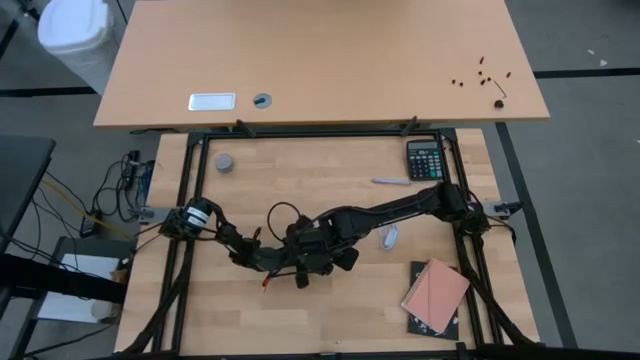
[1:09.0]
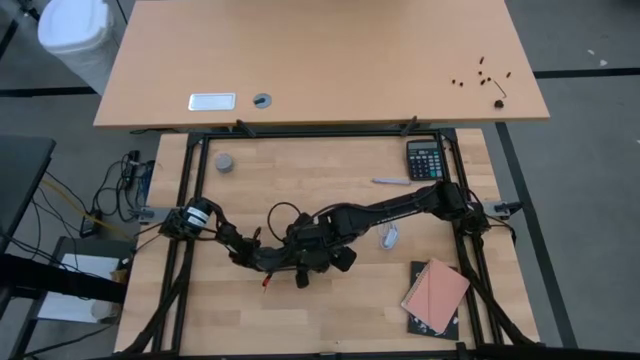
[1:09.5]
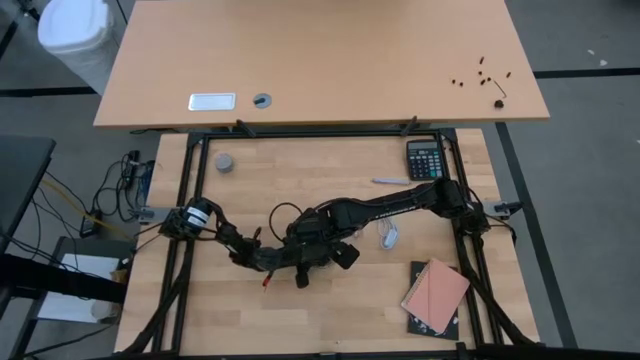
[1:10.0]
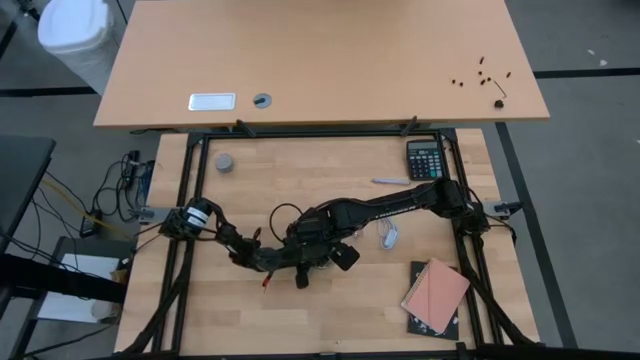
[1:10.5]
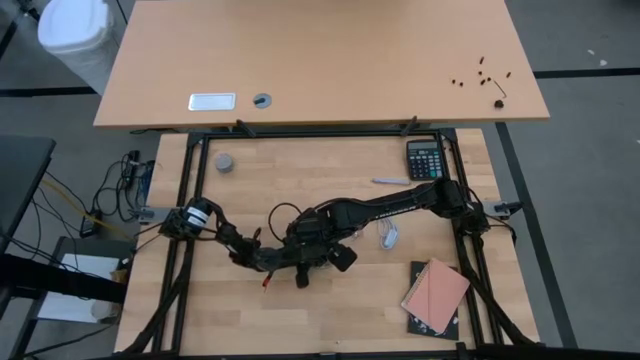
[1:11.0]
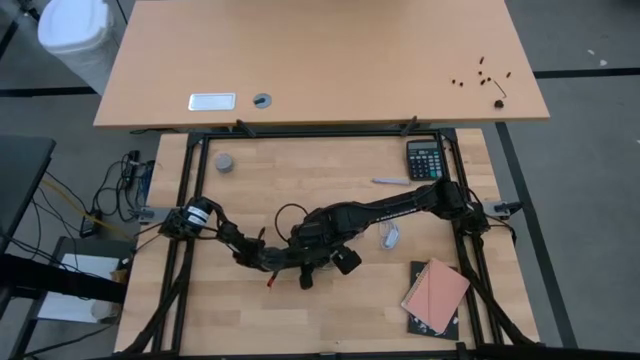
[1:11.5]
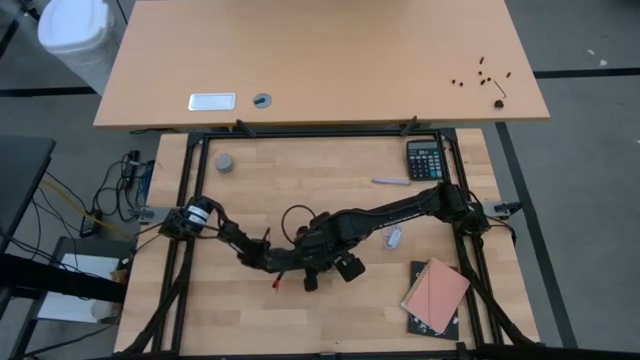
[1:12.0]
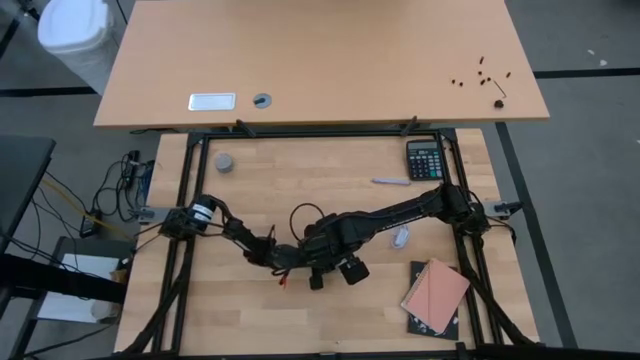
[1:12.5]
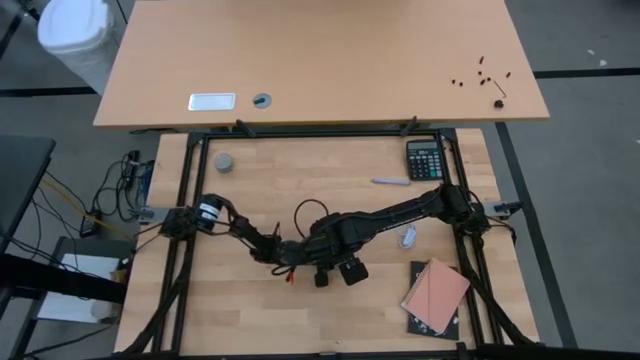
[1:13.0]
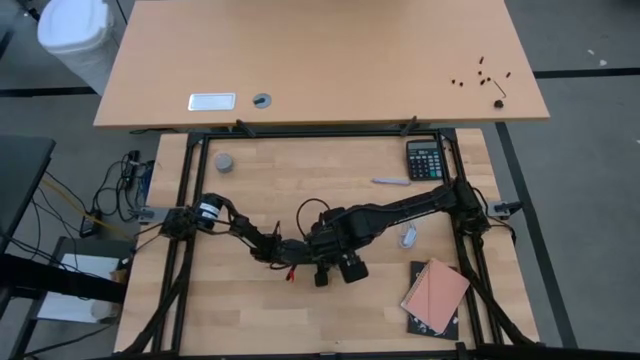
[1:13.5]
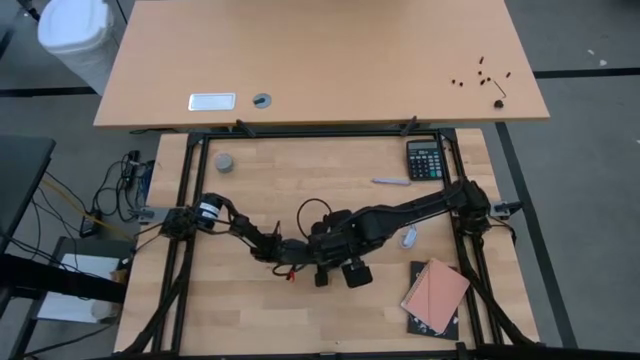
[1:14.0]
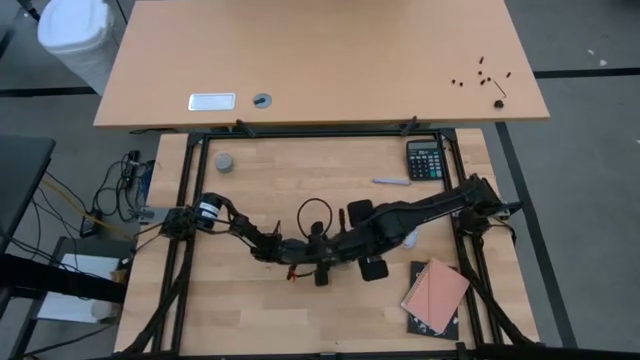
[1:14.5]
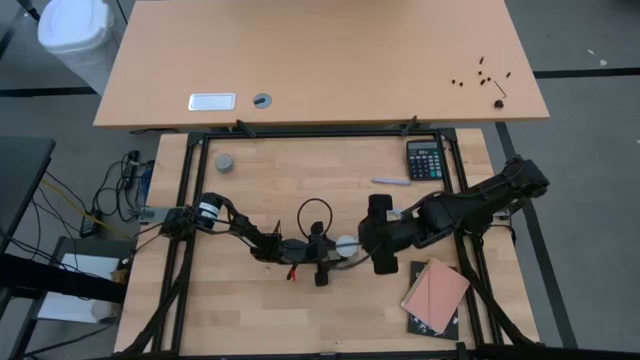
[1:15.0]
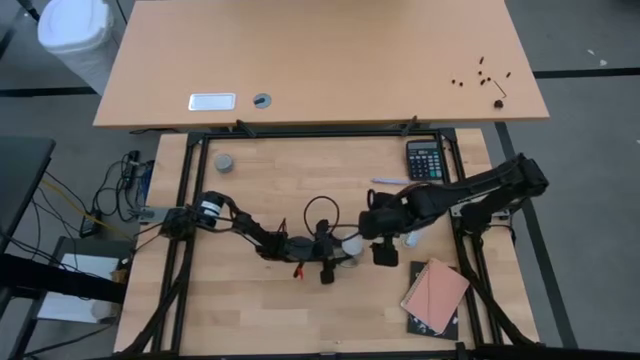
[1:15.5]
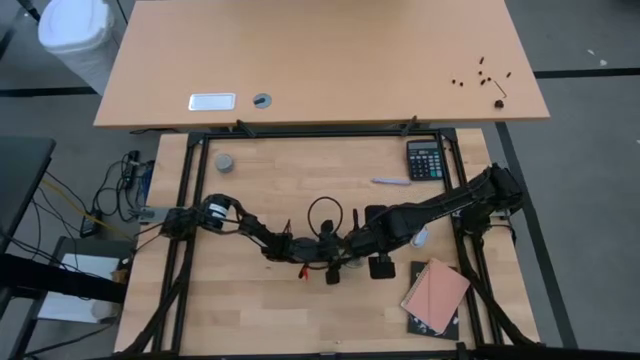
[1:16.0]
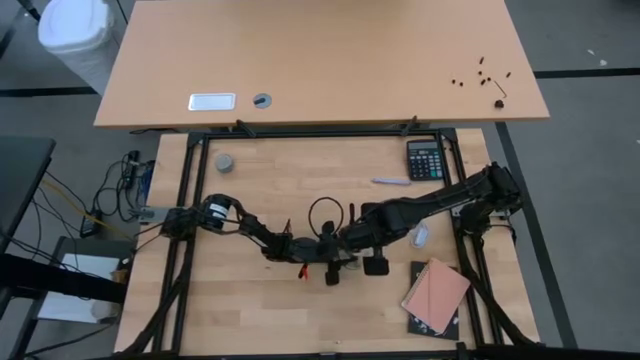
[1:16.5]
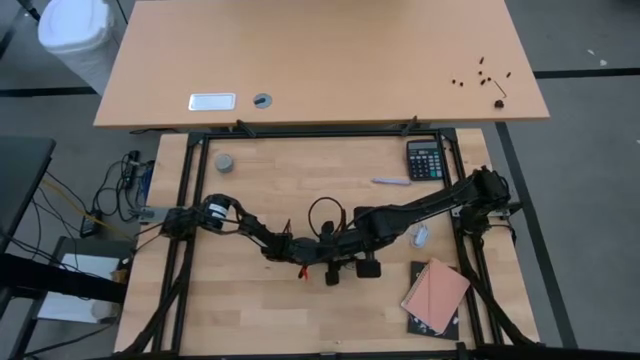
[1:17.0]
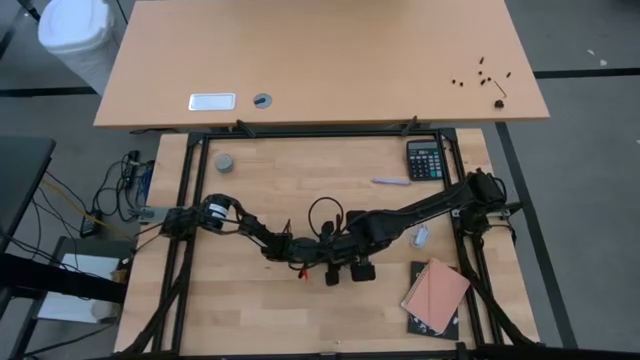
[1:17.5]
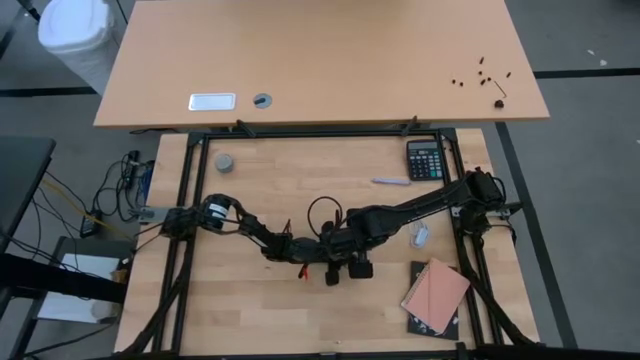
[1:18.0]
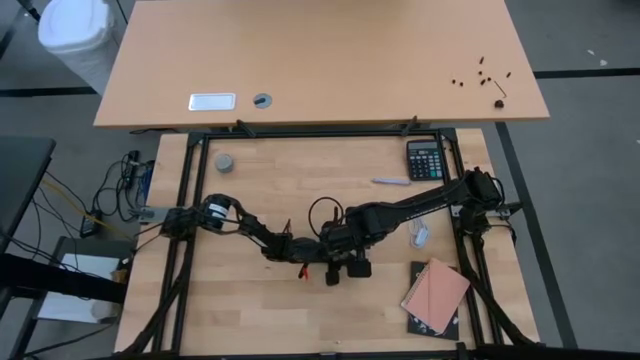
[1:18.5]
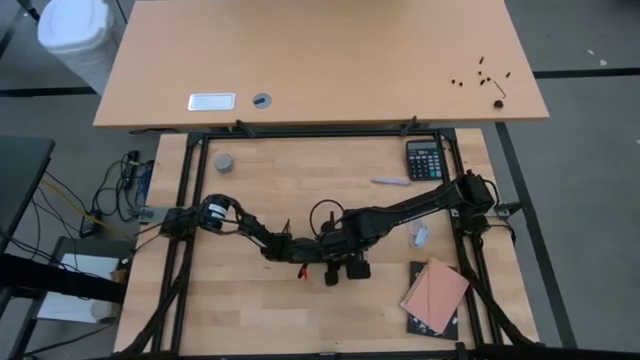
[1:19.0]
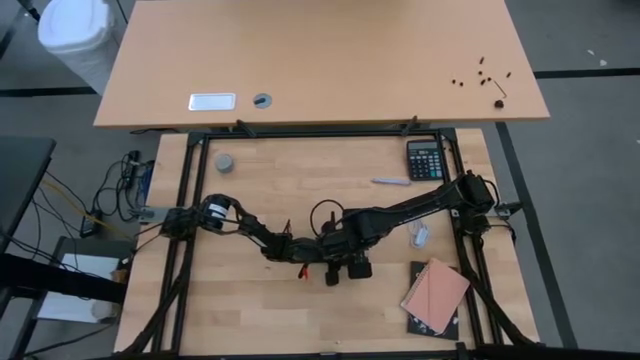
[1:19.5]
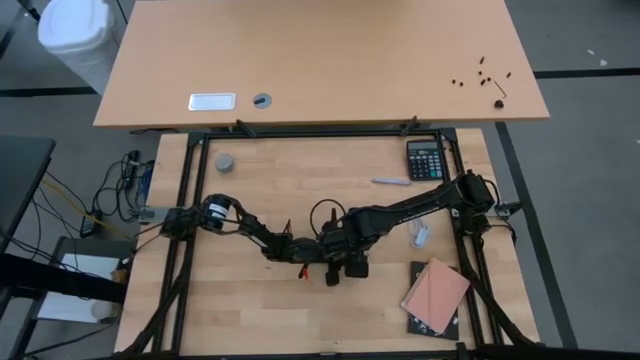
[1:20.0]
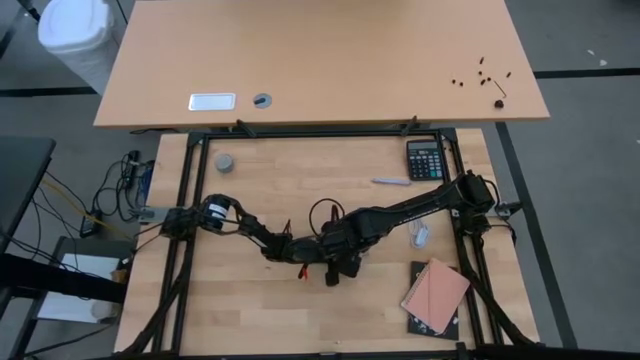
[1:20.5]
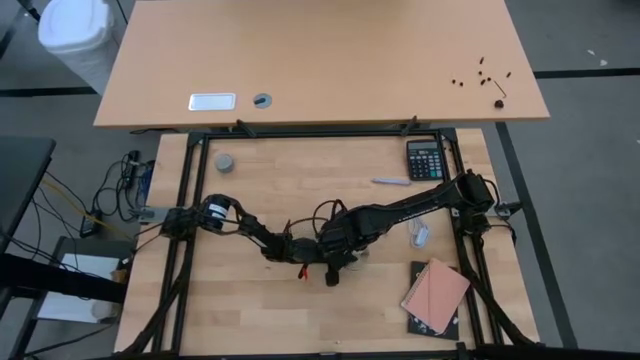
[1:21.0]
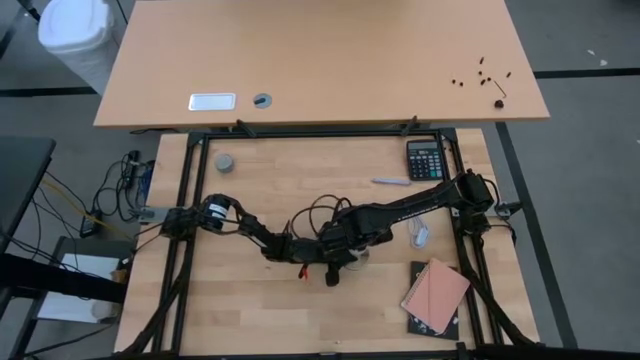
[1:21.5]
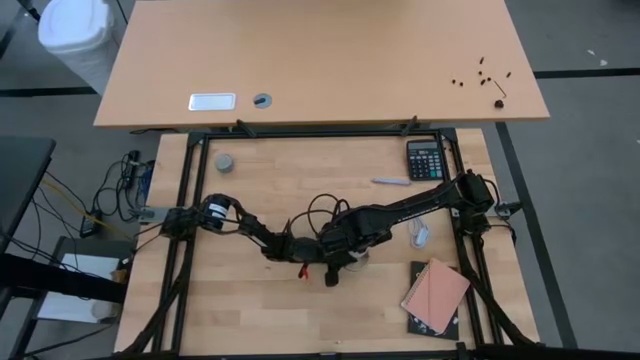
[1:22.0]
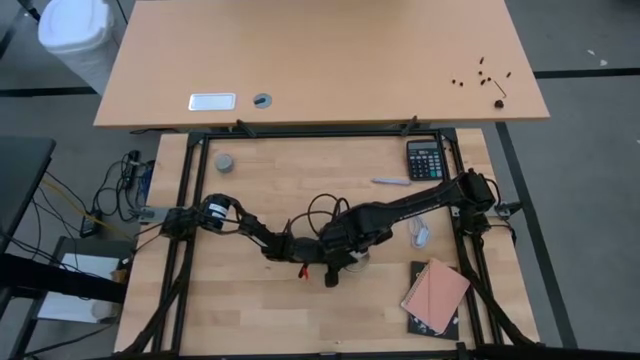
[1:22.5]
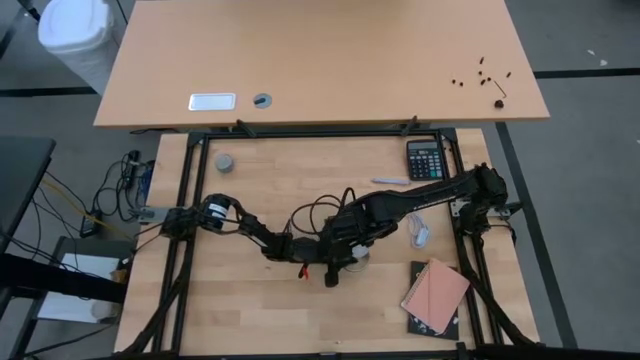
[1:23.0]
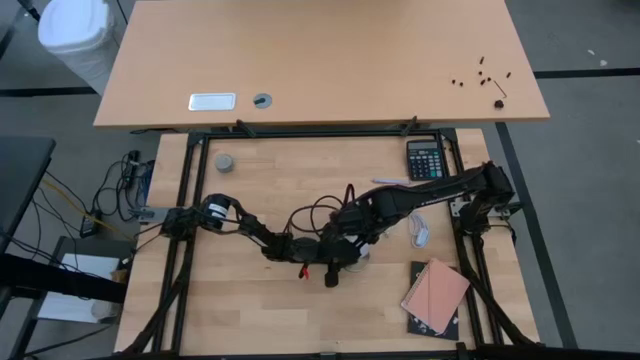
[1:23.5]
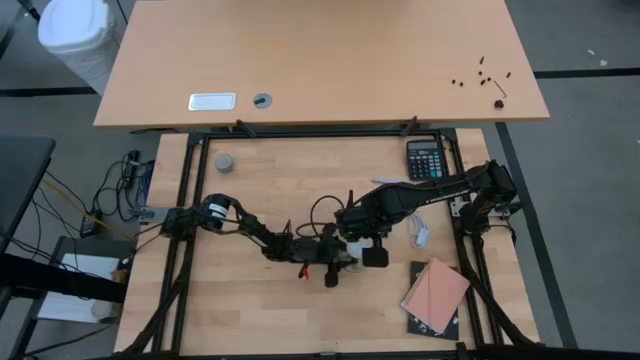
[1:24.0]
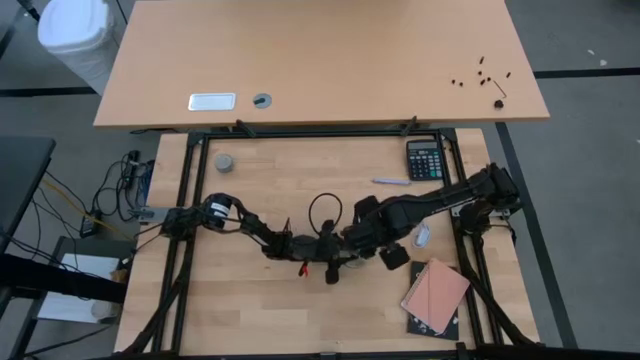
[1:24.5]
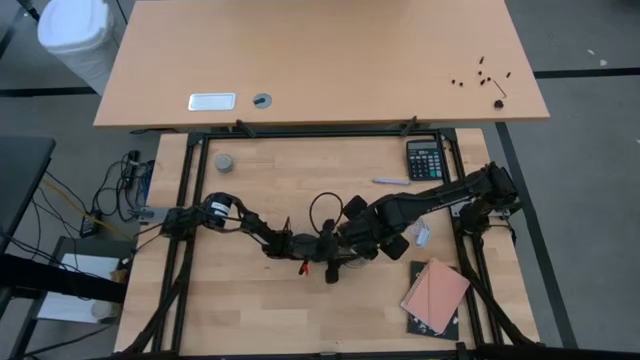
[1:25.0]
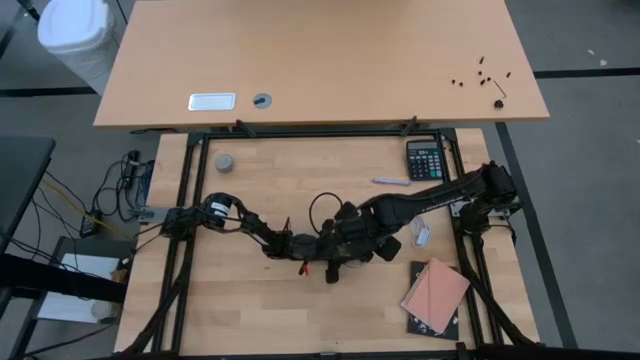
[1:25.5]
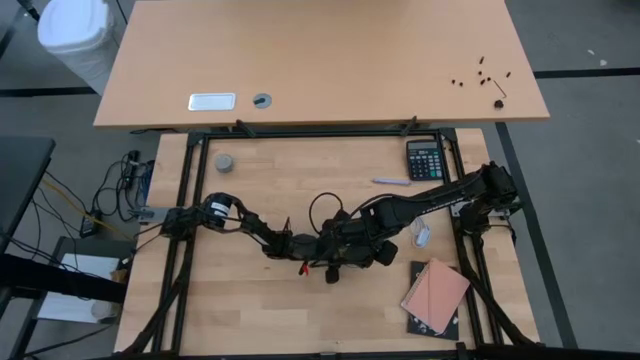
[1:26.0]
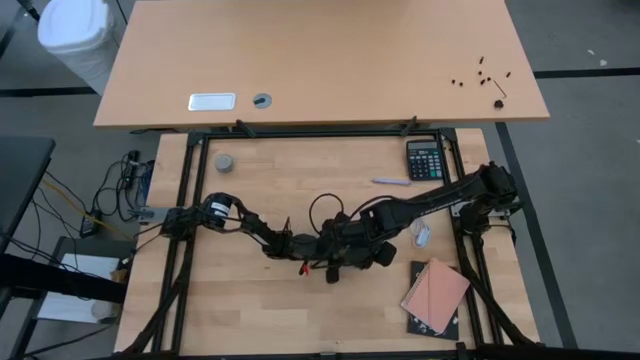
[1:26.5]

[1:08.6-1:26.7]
Task: Screw lightbulb
Insert the lightbulb into the bronze lamp socket

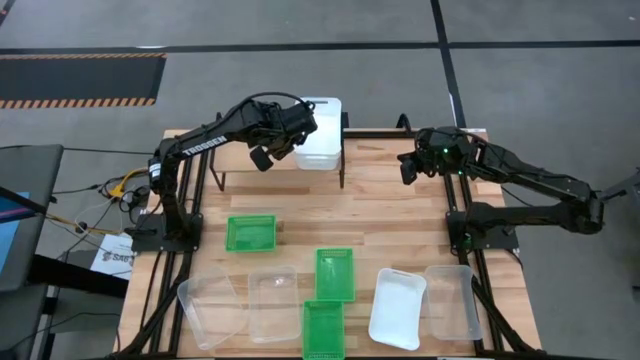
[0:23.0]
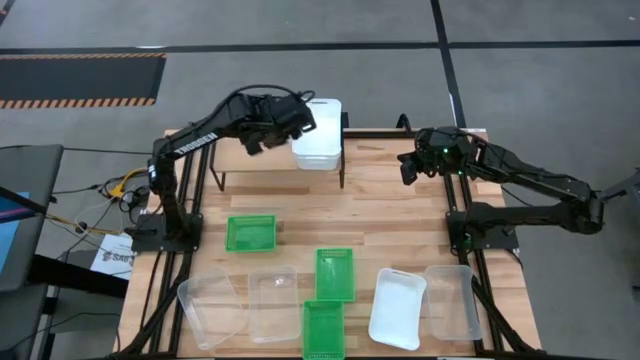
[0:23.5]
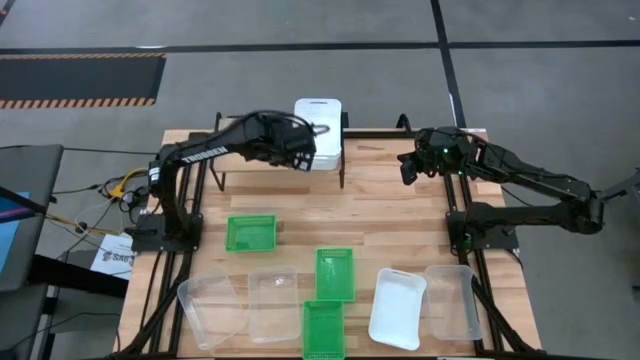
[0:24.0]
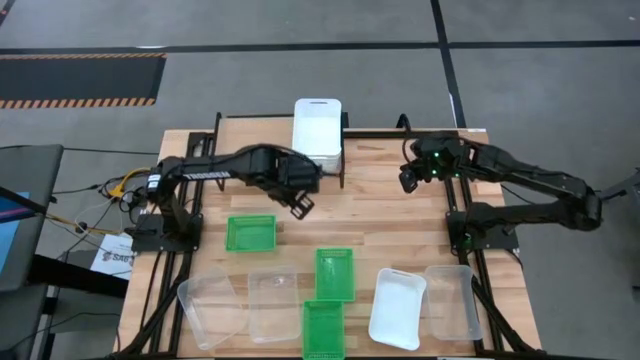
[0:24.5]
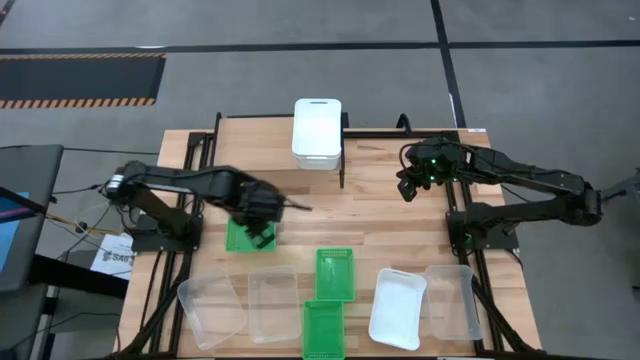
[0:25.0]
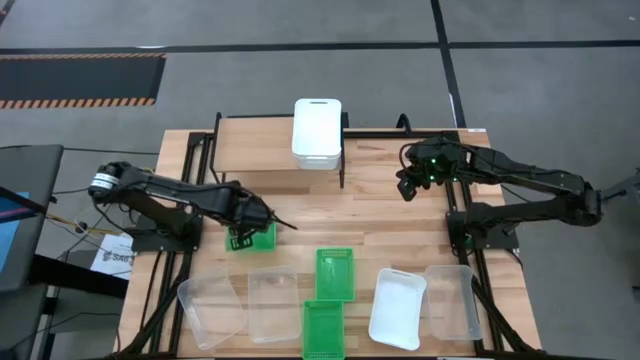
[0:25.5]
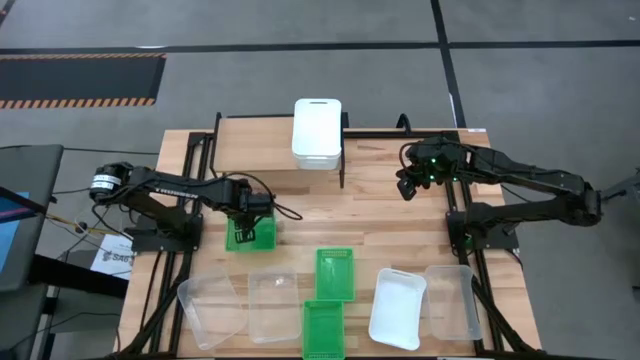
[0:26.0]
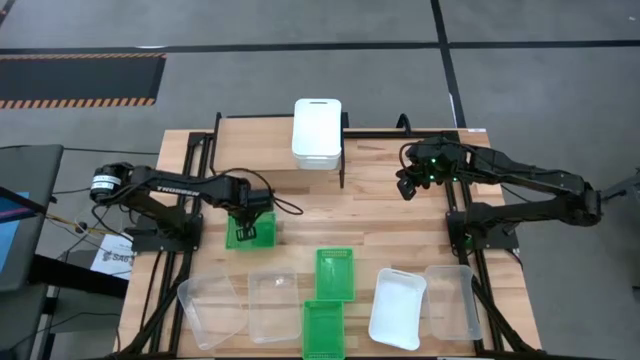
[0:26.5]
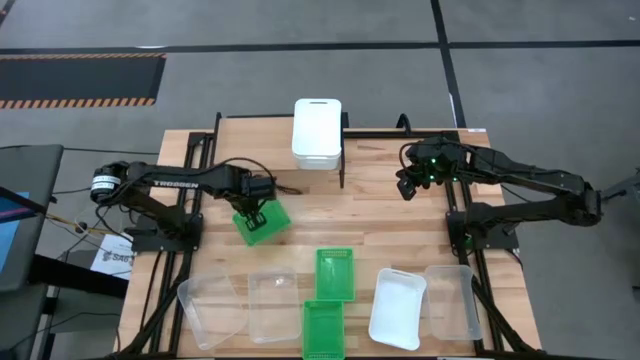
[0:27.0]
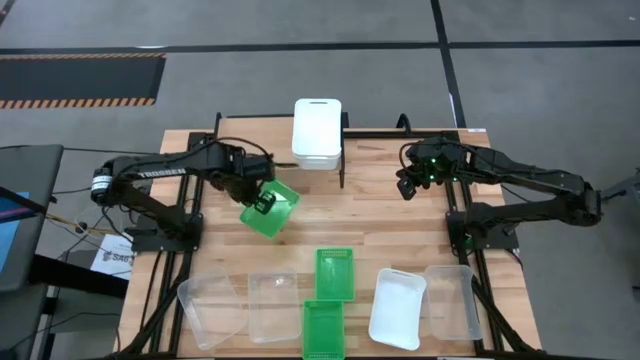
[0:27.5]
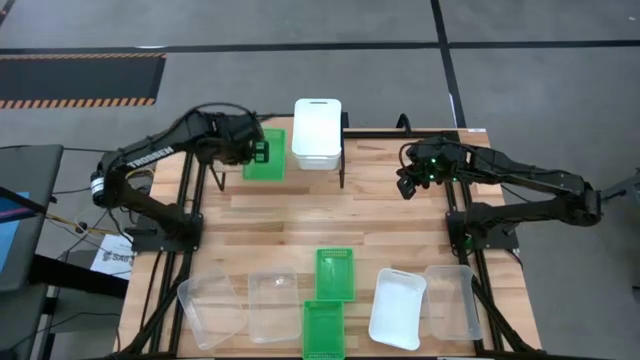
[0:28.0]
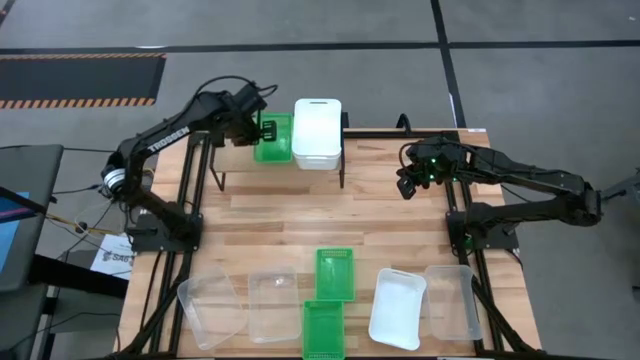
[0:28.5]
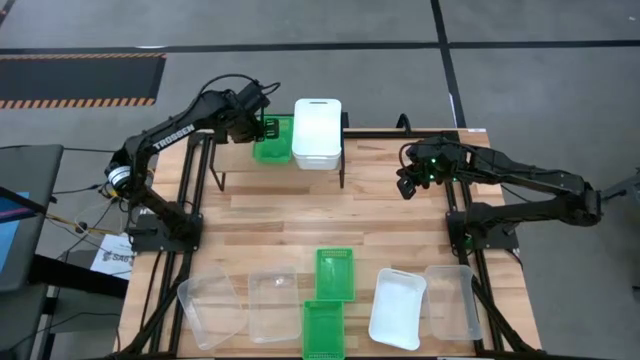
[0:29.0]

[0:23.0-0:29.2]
Task: Stack baskets on shelf by color
Put the top left green bin on the shelf
